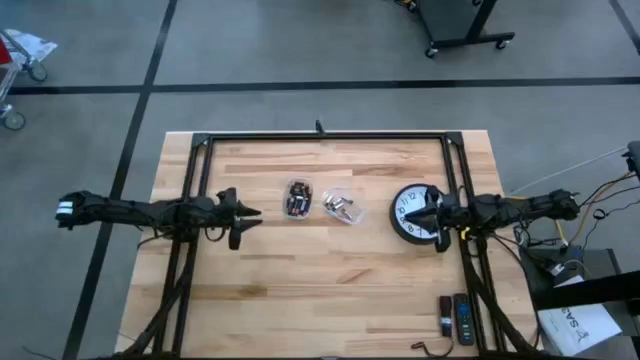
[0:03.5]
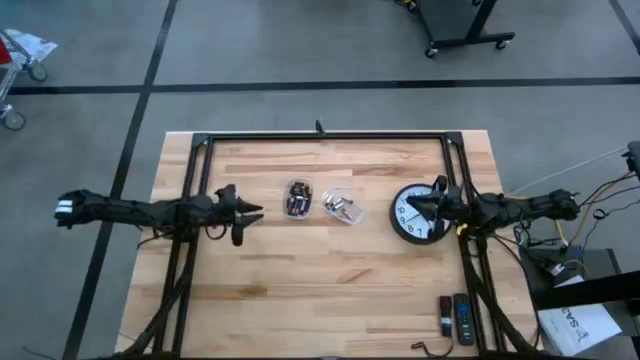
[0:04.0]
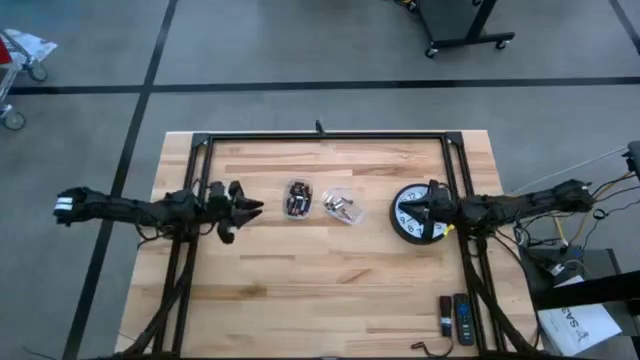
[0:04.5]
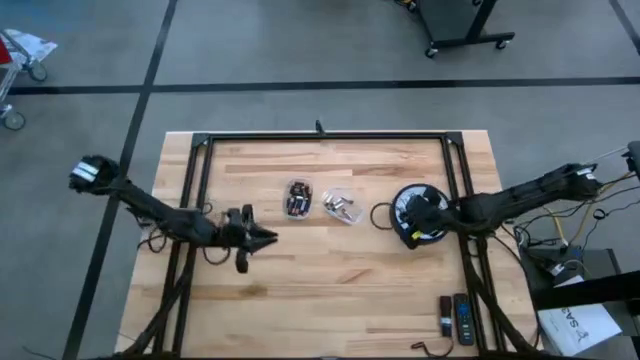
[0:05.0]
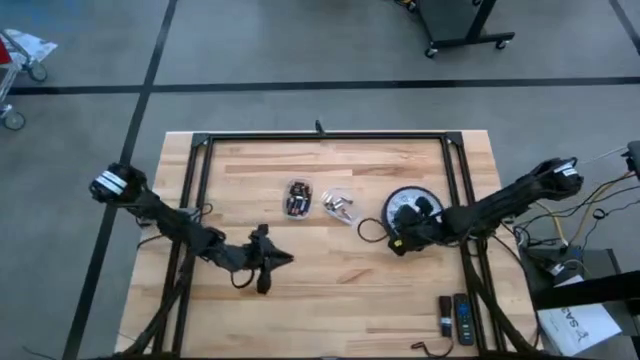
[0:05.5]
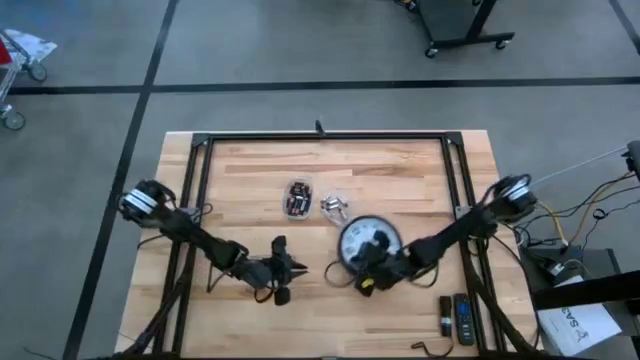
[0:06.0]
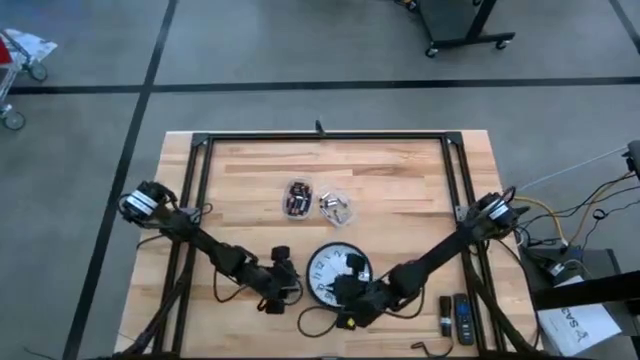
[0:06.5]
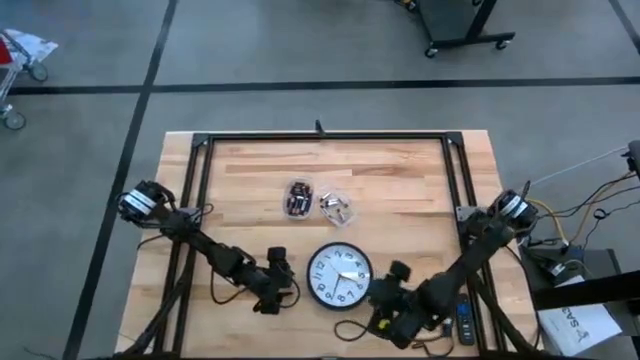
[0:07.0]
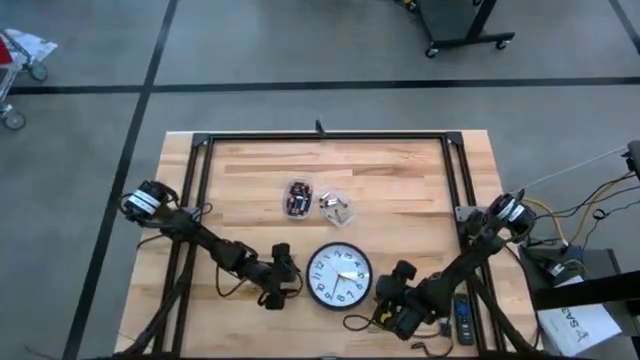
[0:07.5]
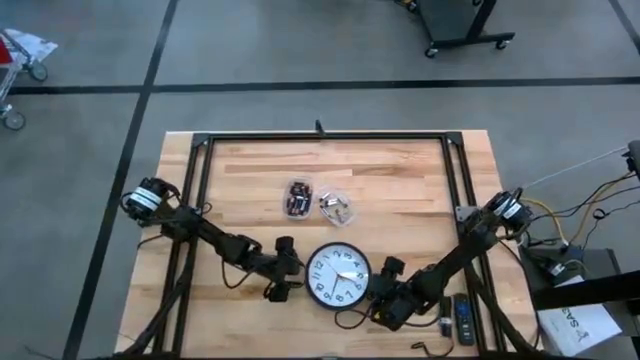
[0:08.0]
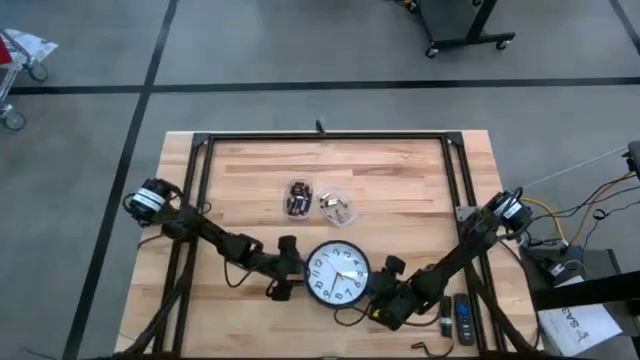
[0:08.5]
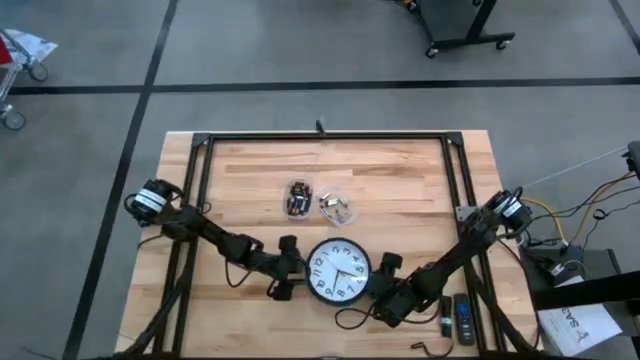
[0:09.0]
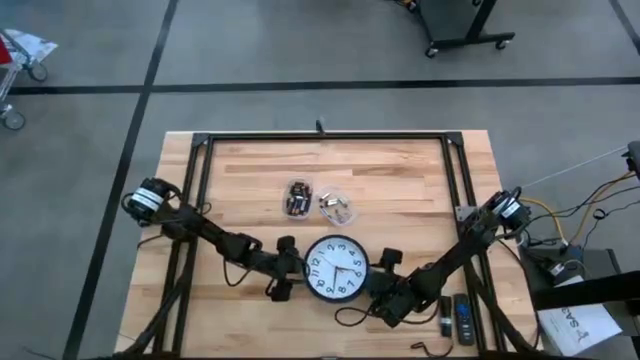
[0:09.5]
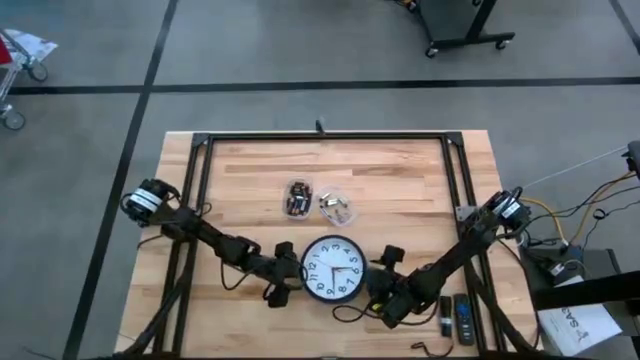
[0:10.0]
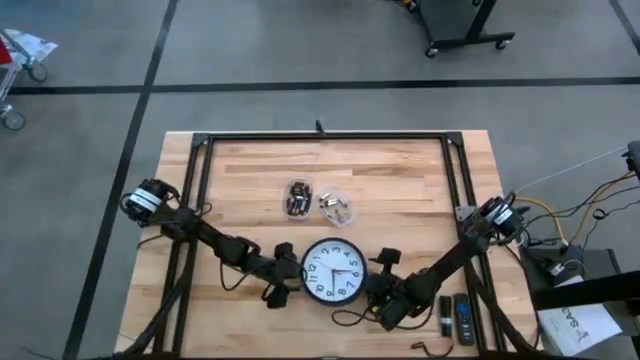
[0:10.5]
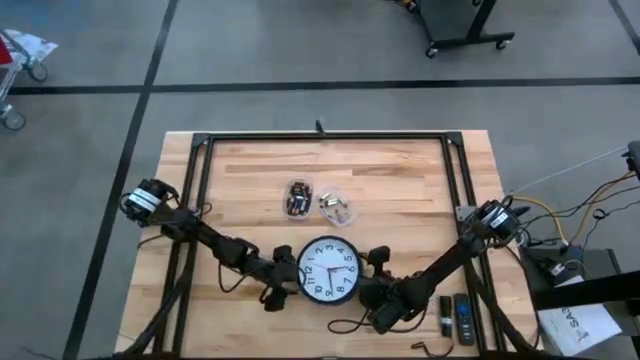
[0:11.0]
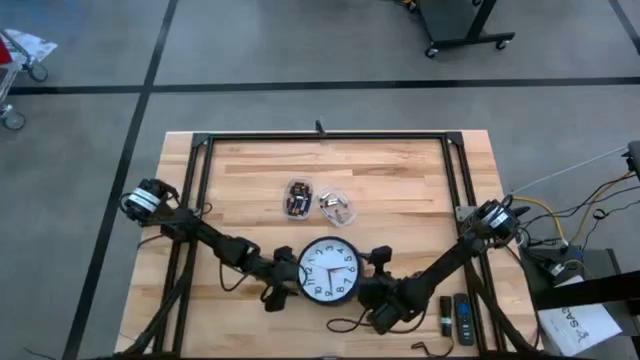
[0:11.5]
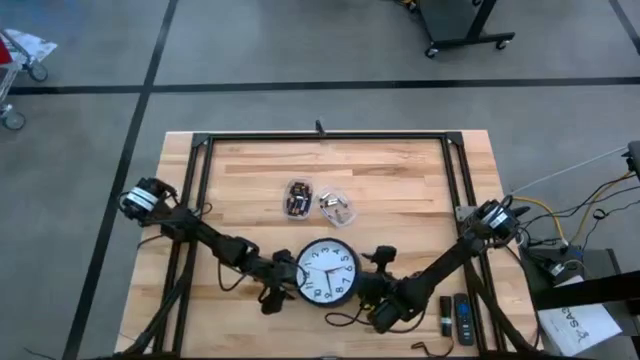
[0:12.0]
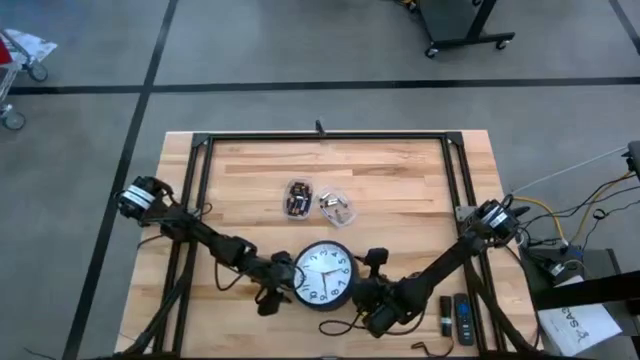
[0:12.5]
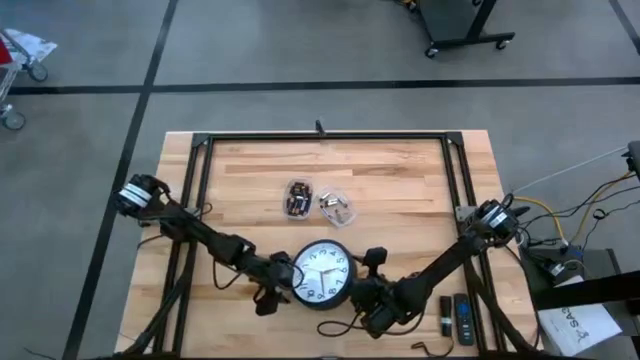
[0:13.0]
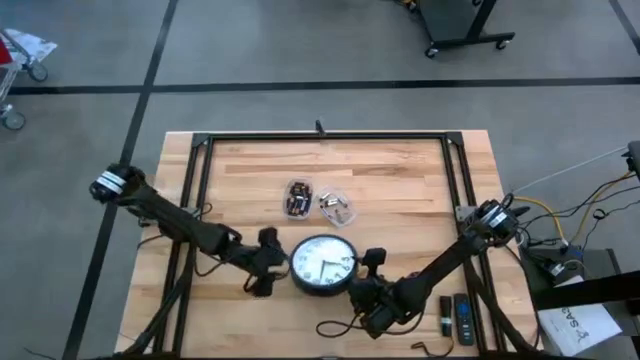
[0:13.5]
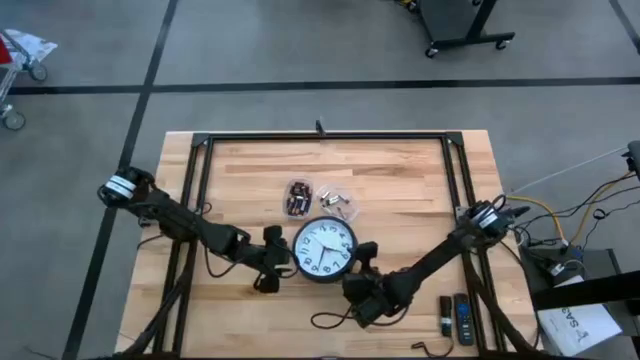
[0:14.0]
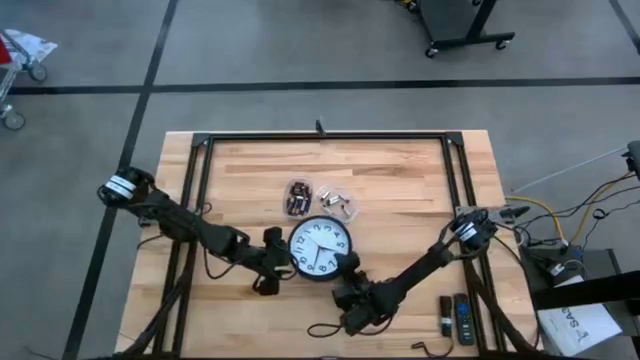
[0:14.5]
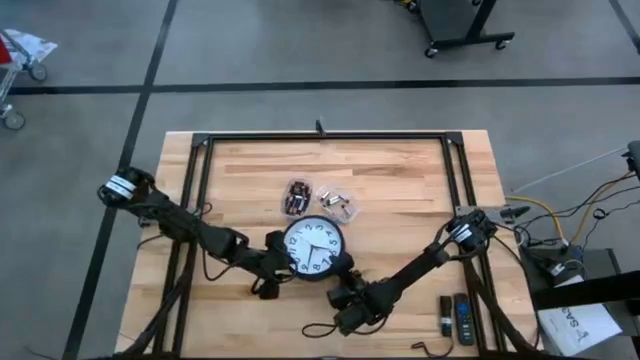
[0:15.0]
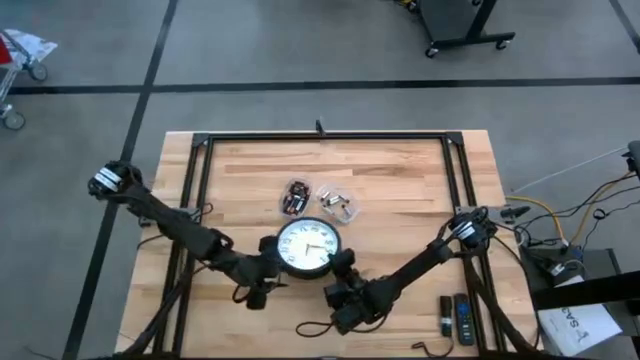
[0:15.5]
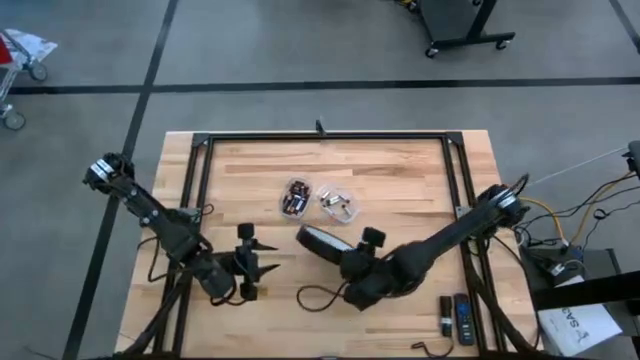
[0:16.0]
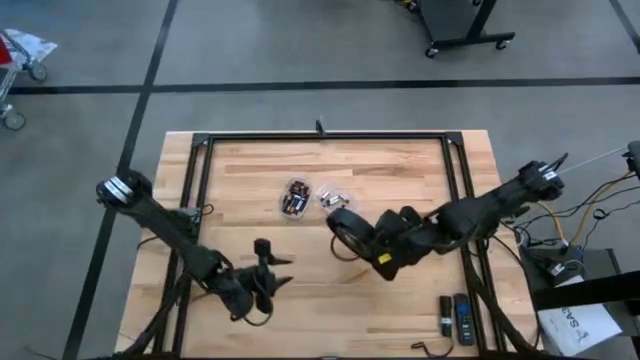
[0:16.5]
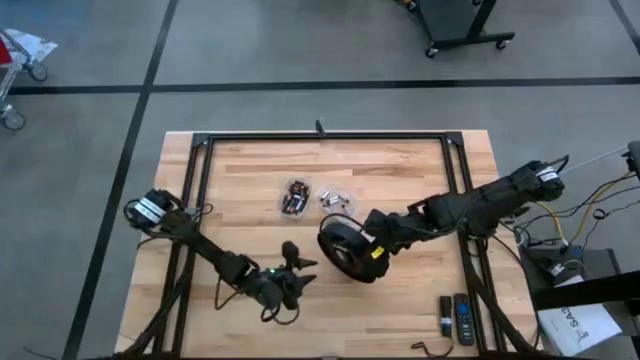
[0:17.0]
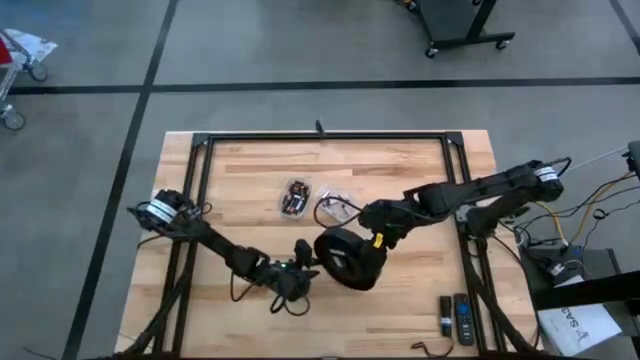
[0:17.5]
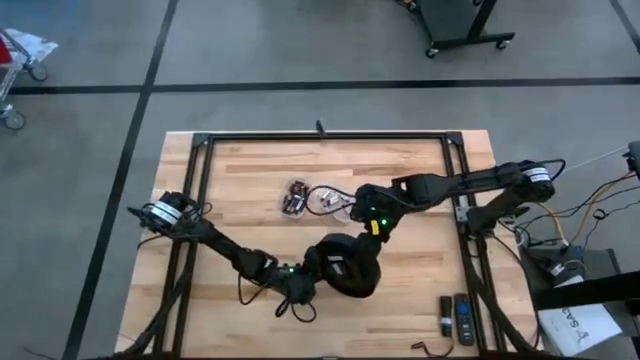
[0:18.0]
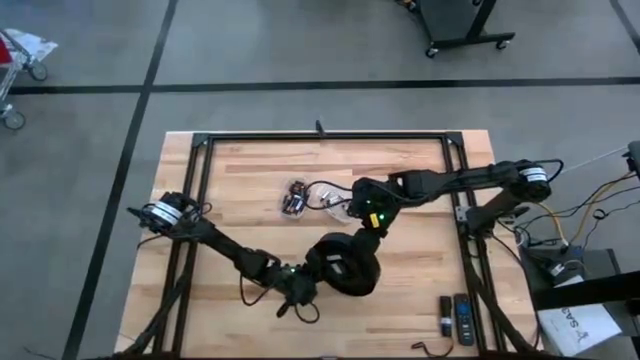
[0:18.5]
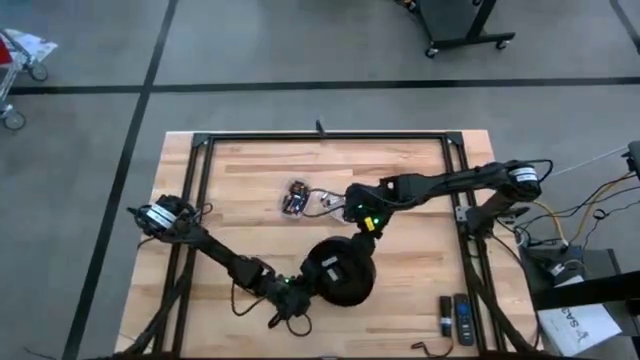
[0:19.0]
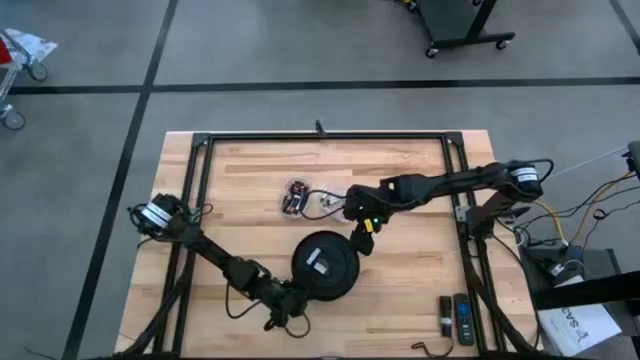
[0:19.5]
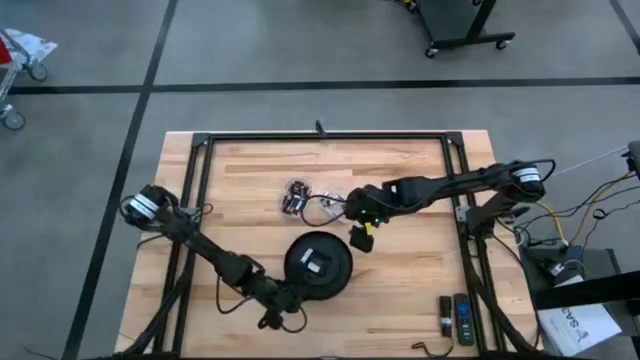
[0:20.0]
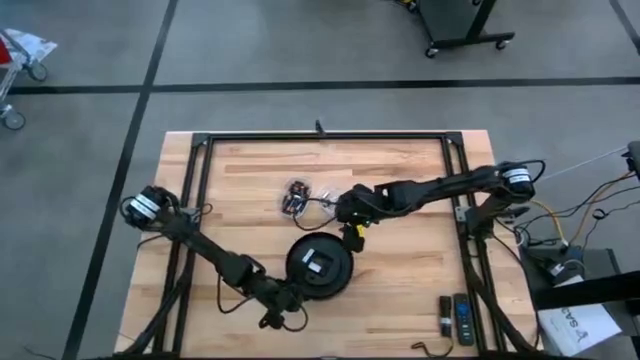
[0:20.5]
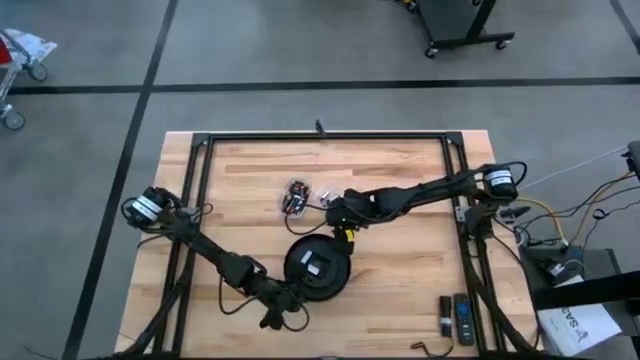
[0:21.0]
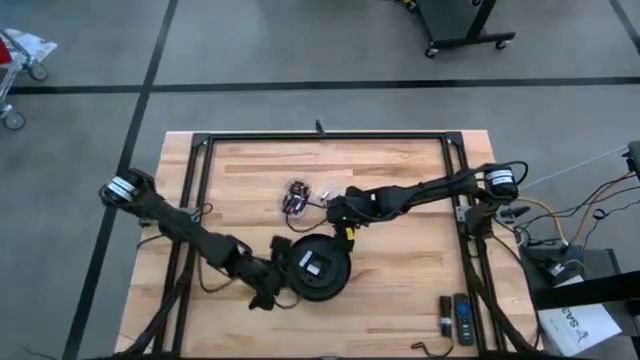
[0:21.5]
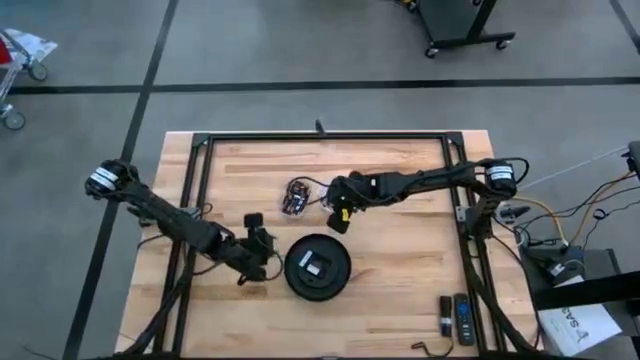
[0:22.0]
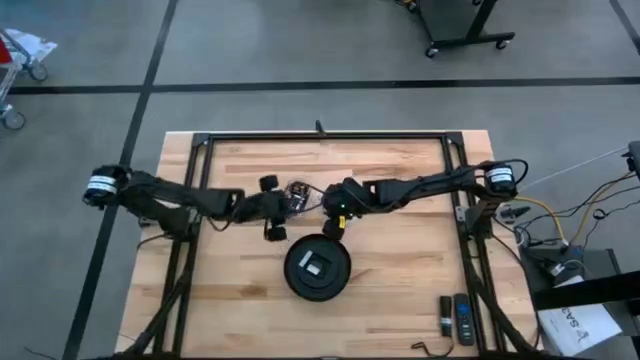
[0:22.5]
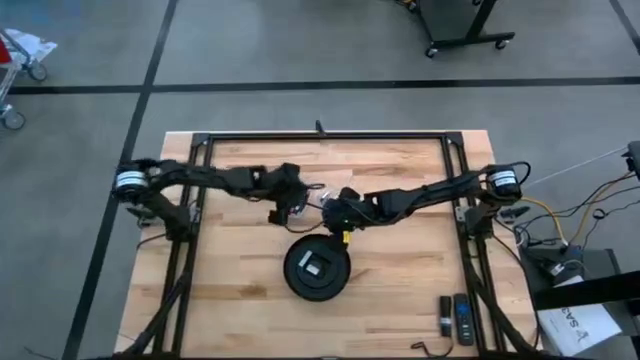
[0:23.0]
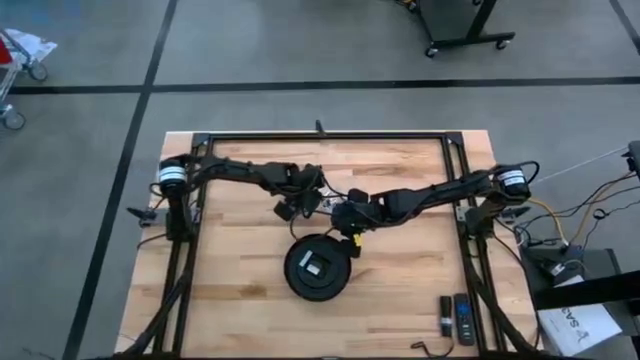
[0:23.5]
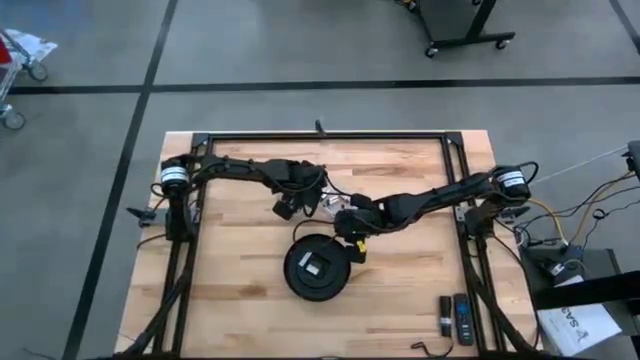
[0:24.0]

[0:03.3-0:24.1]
Task: Insert battery
Insert the silver battery into the clock's battery compartment
